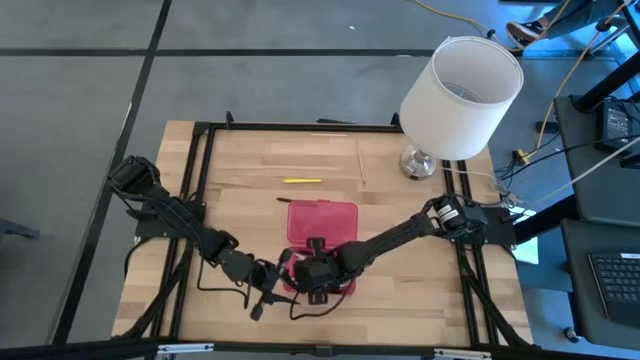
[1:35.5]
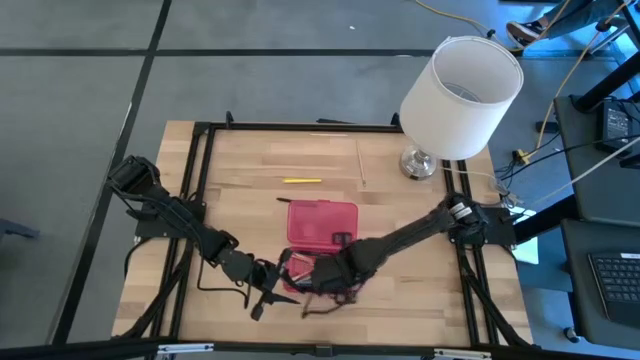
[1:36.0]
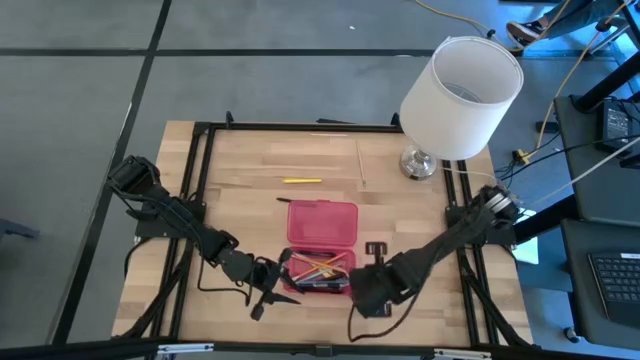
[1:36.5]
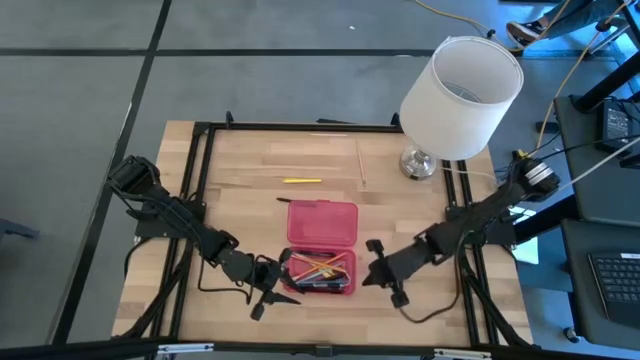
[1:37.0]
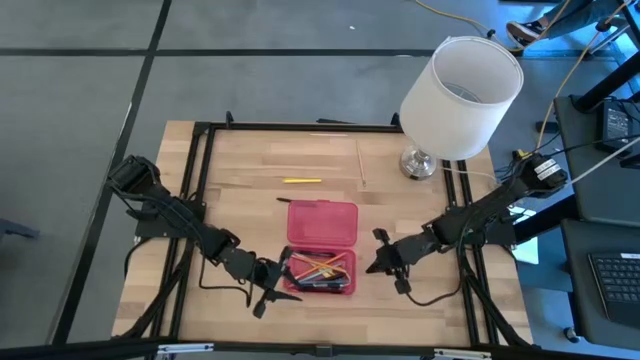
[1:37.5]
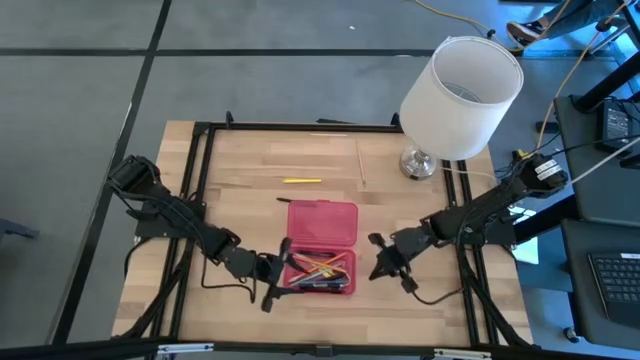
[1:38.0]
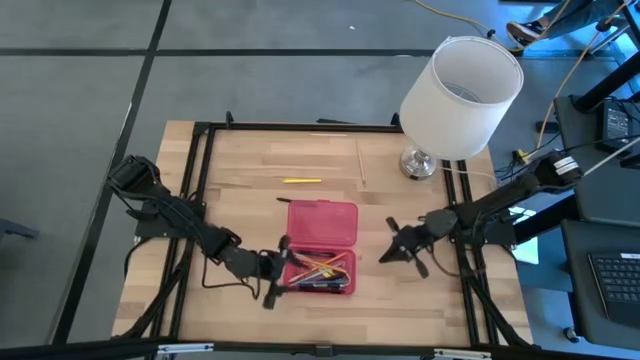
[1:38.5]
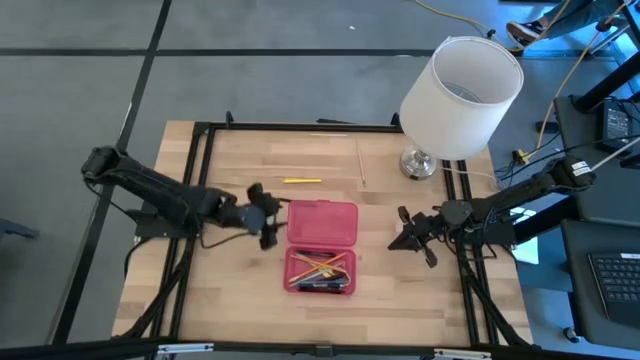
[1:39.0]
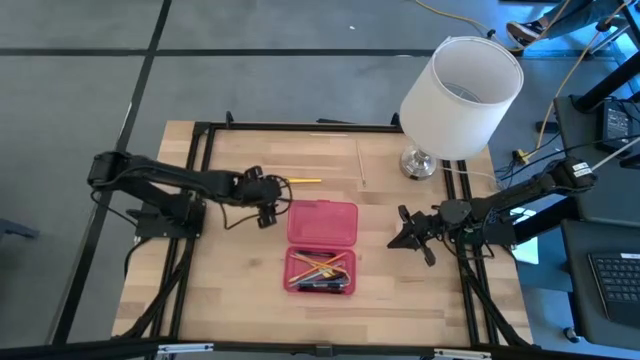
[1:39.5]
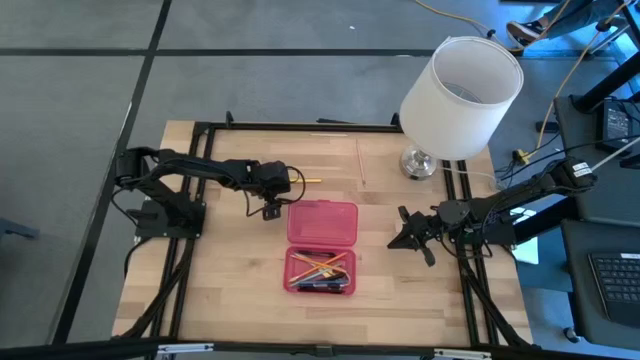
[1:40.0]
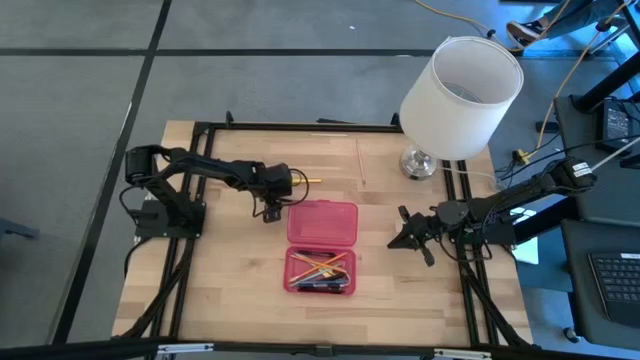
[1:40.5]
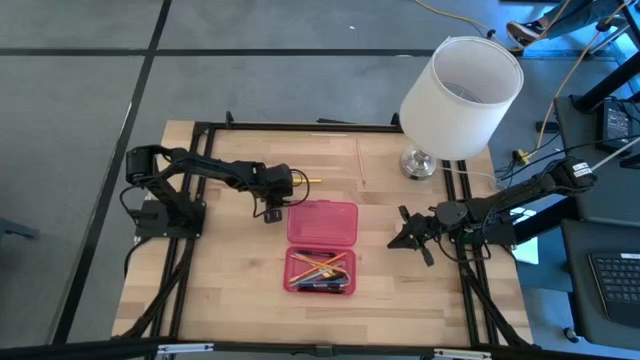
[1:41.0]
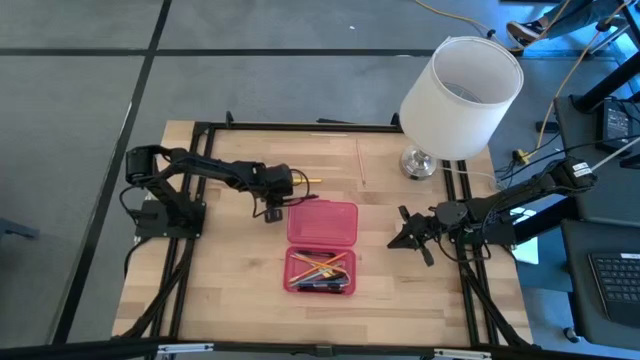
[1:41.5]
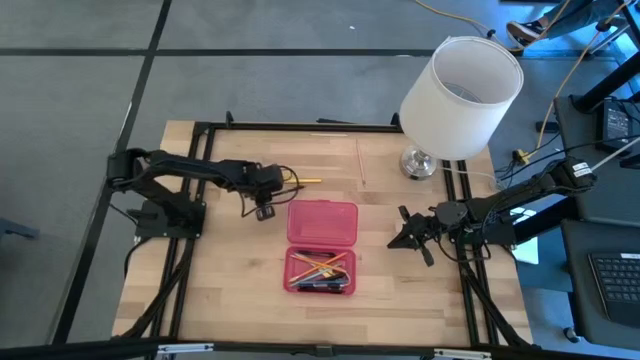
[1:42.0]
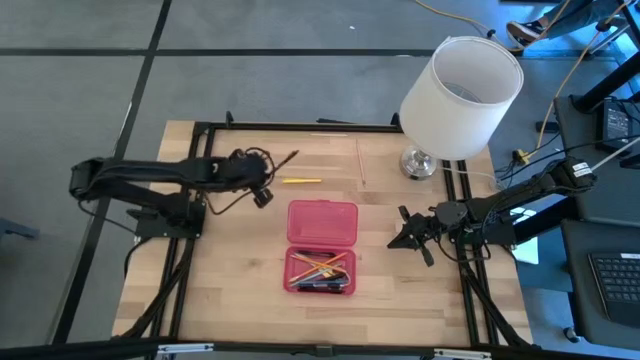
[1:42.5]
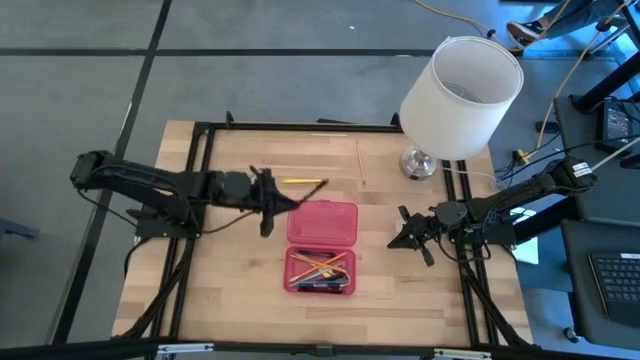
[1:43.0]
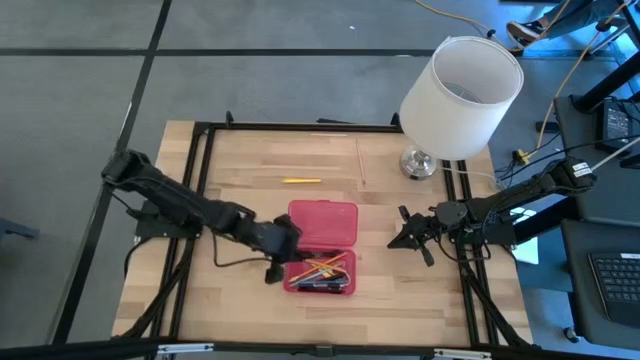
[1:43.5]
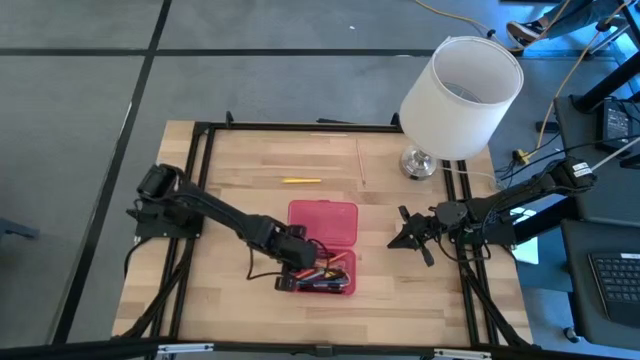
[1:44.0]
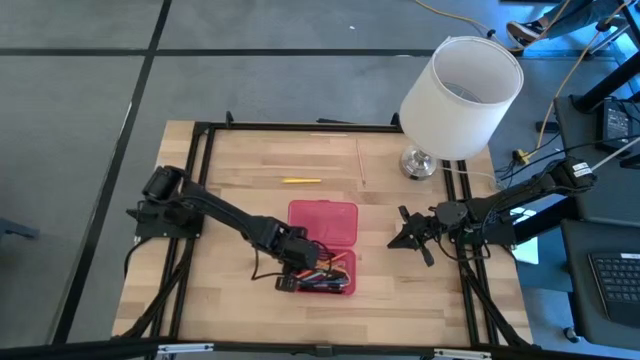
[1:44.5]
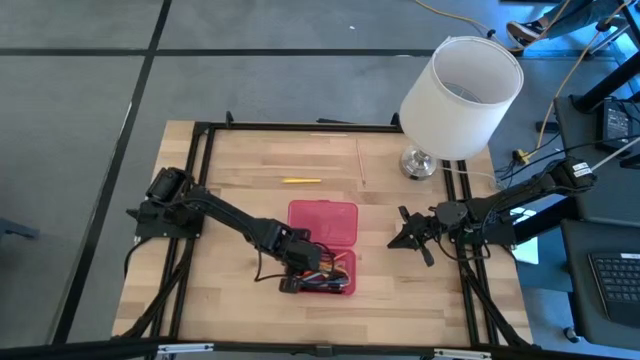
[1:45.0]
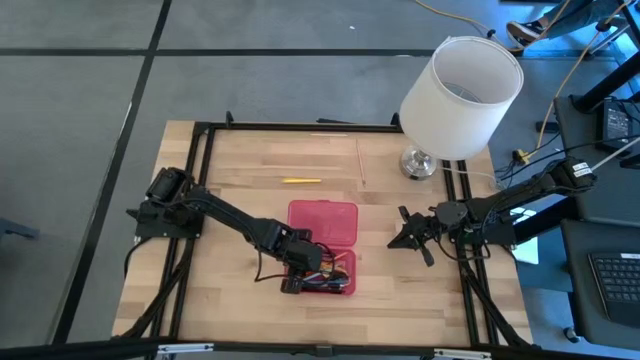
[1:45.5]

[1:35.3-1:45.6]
Task: Pick & place school supplies into a supply box
Put the black pen into the red supply box

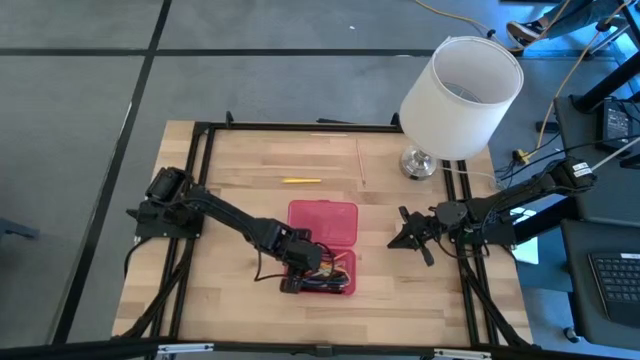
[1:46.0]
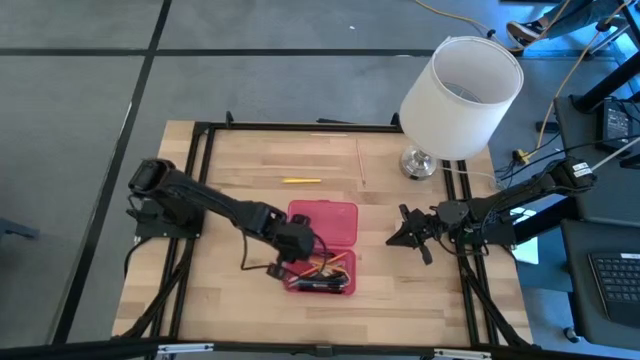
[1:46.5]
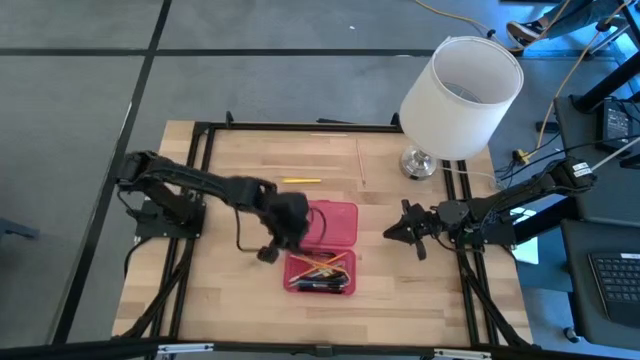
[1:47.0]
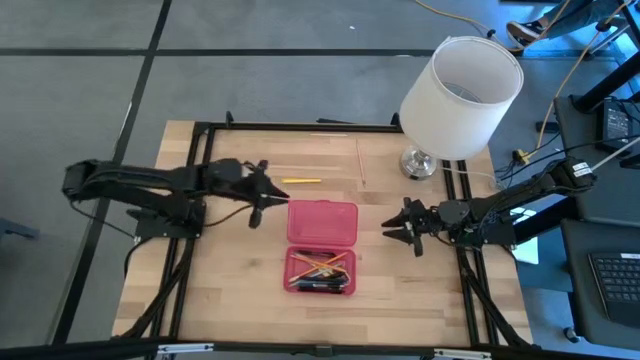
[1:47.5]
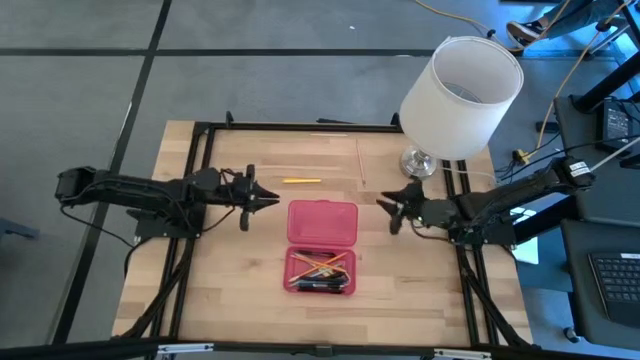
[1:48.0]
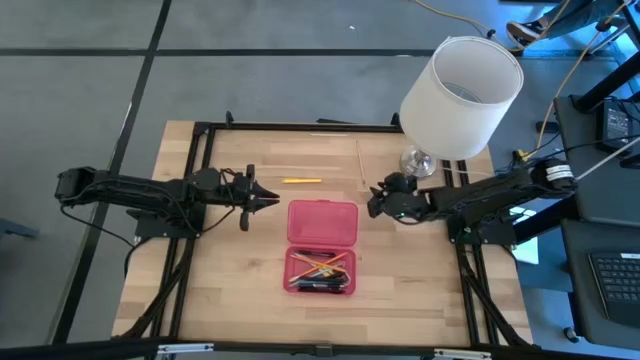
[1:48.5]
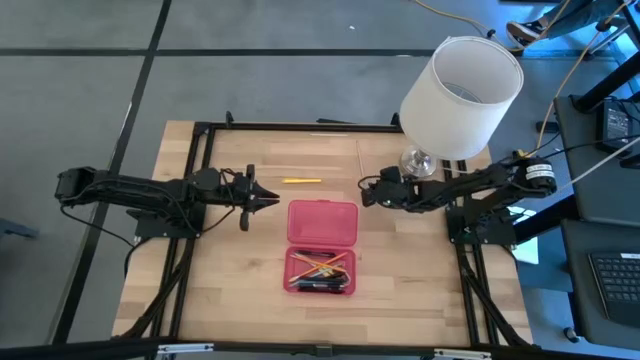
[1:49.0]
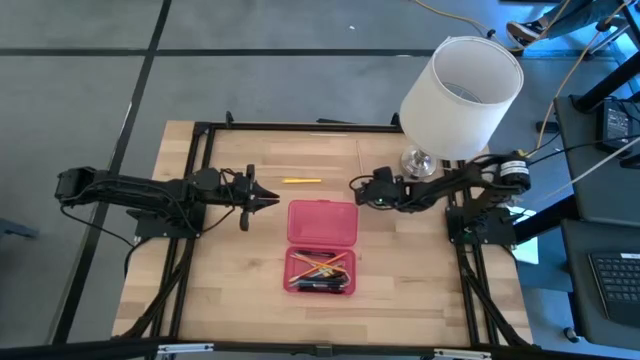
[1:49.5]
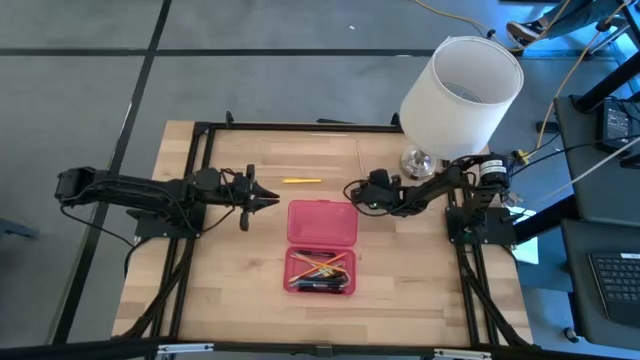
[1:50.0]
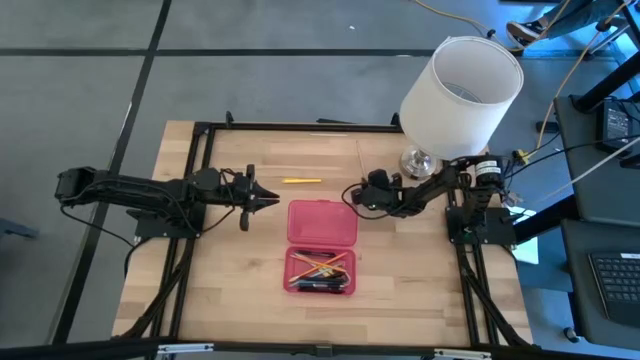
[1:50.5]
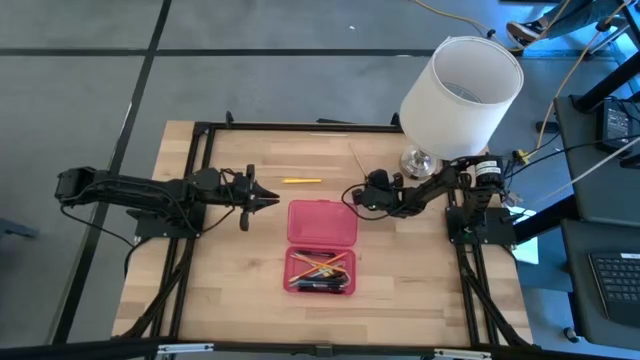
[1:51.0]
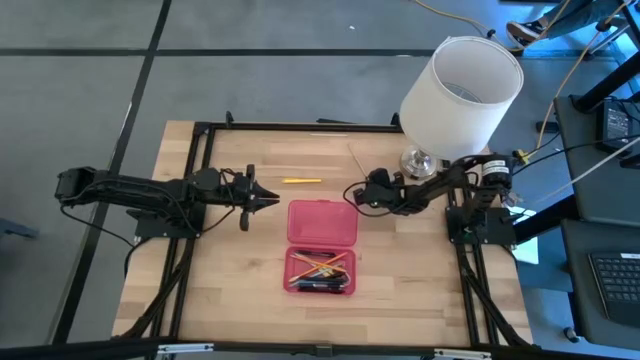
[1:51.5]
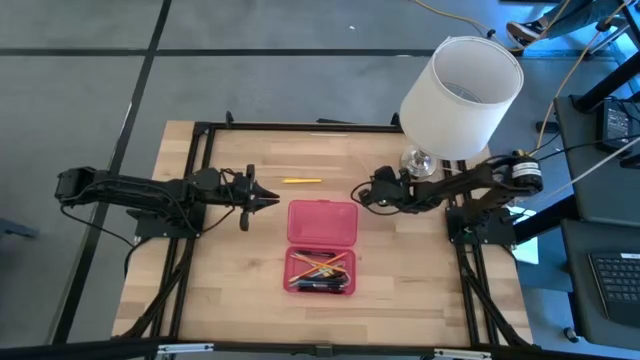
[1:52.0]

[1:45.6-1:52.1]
Put the brown pencil into the red supply box

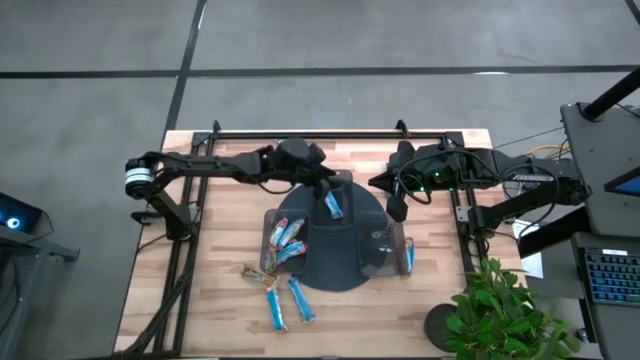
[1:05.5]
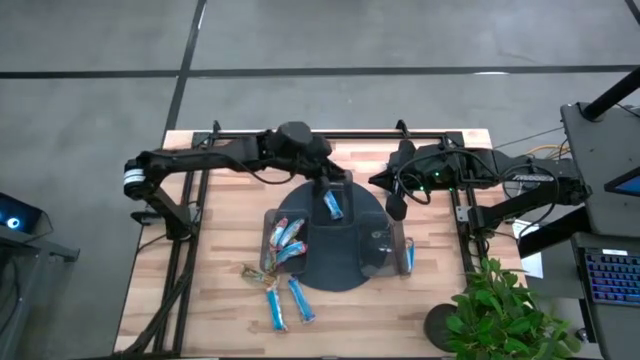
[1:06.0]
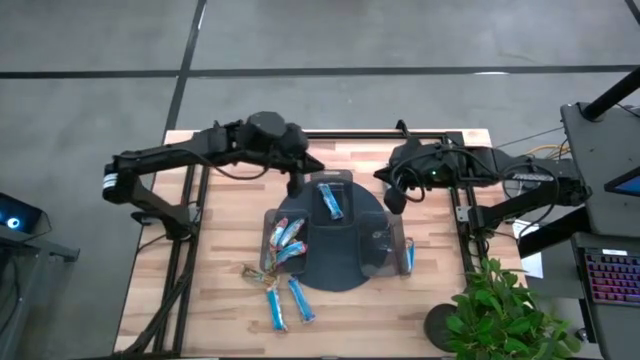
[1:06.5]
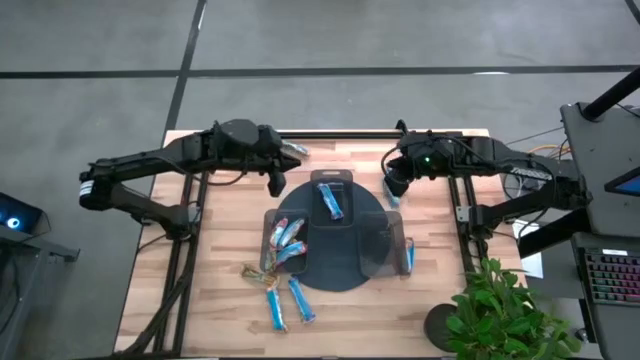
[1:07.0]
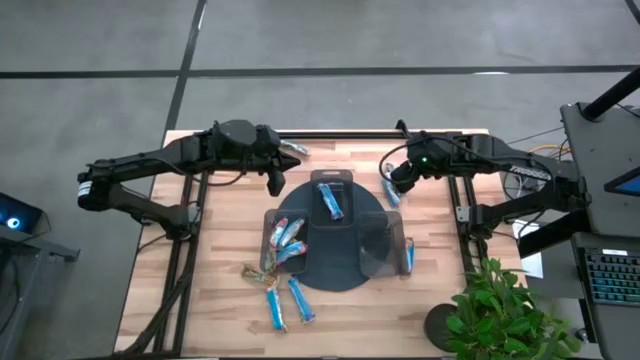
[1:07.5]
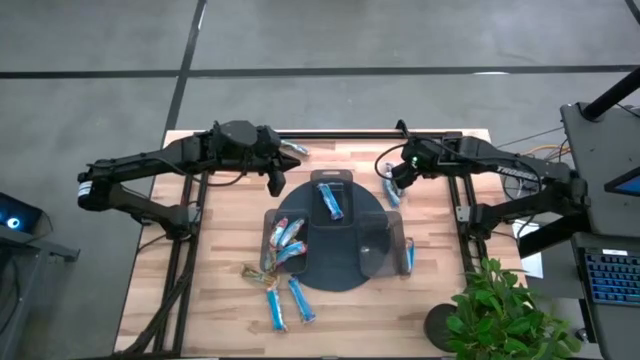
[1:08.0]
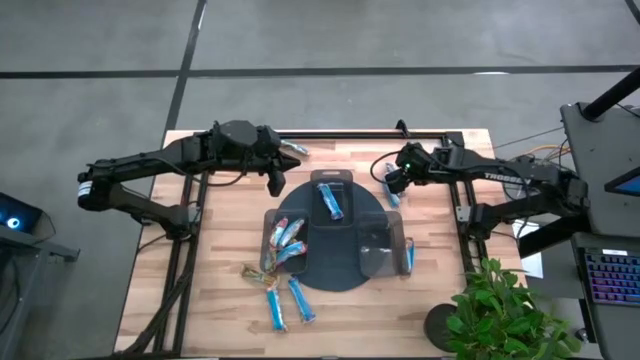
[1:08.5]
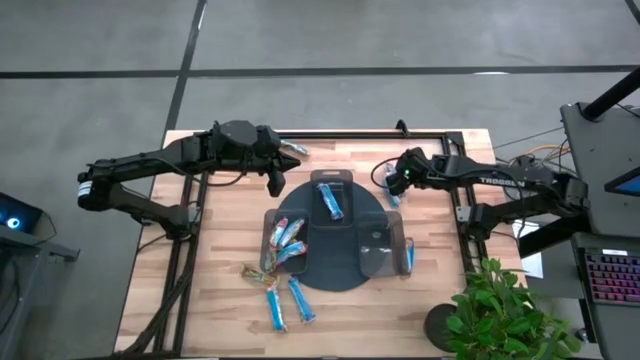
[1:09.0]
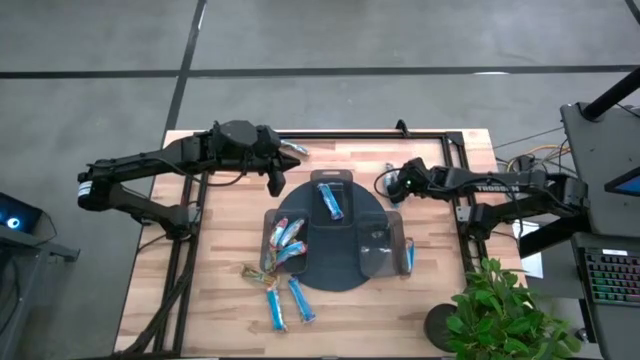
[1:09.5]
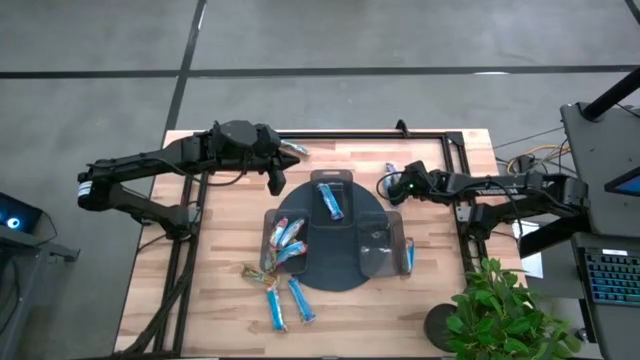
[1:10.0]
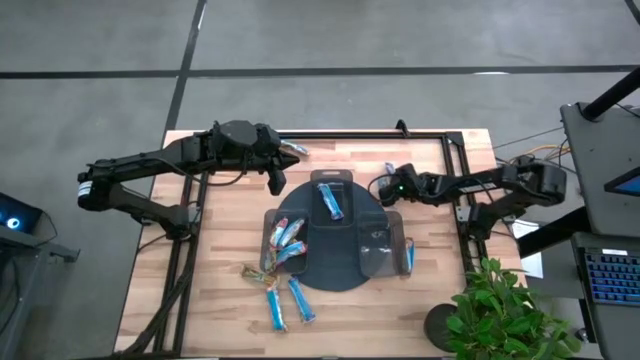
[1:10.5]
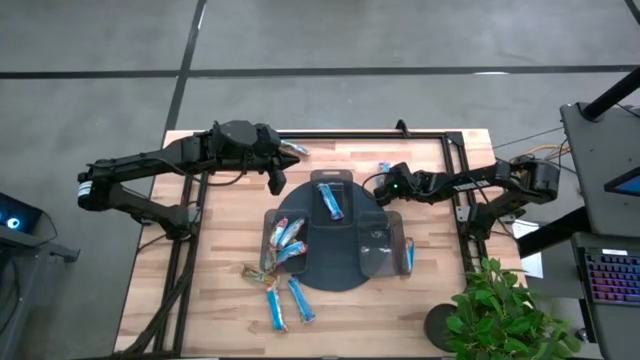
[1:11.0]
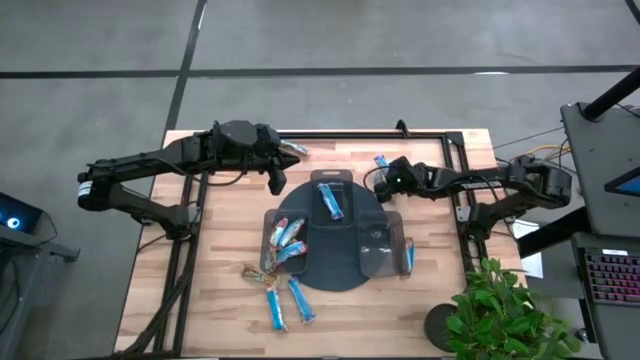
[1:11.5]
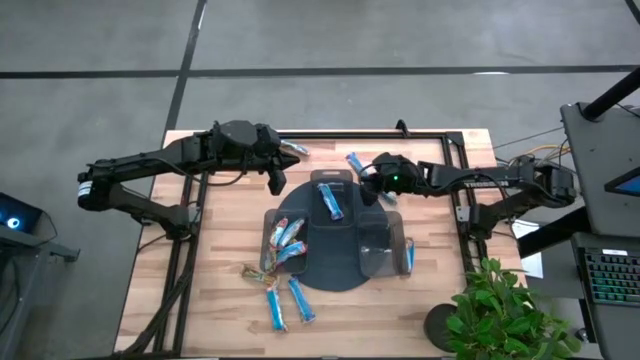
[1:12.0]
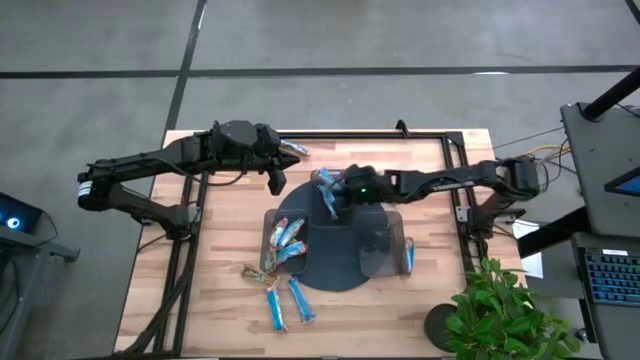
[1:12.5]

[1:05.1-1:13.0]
Task: Pick and place Granola Bars by type
Put the blue granola bar into the top black bin
